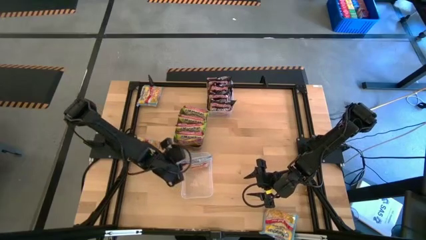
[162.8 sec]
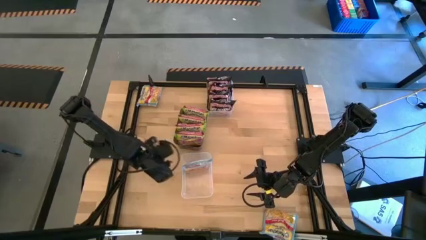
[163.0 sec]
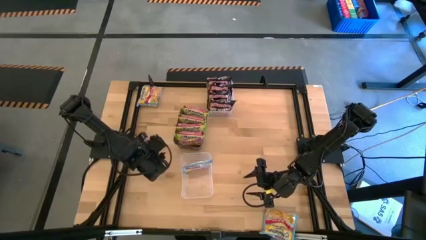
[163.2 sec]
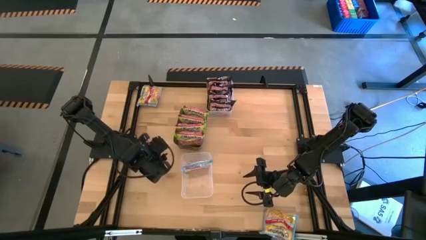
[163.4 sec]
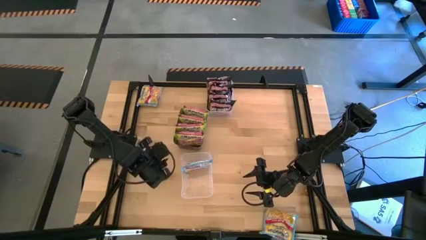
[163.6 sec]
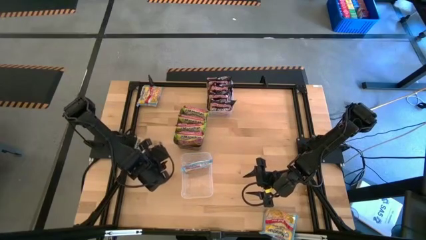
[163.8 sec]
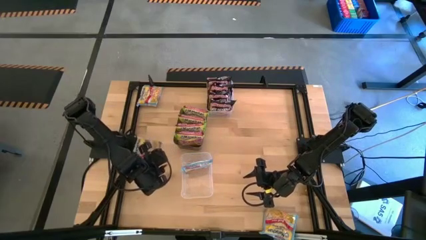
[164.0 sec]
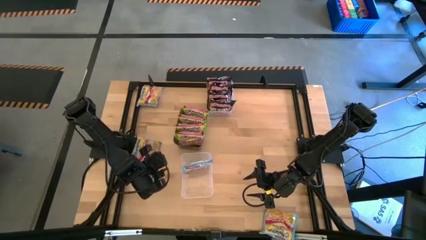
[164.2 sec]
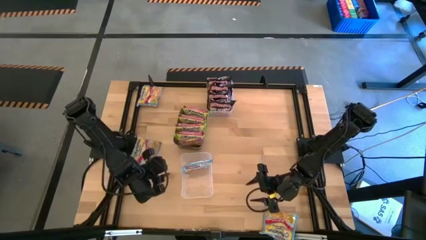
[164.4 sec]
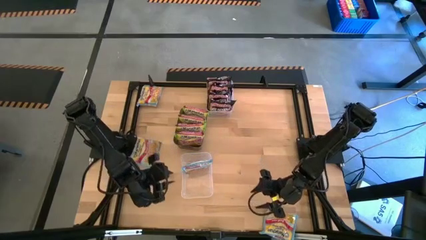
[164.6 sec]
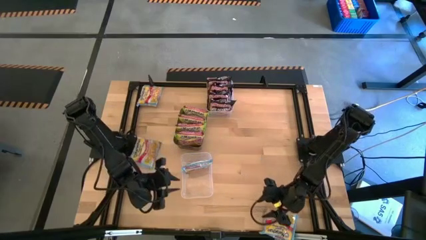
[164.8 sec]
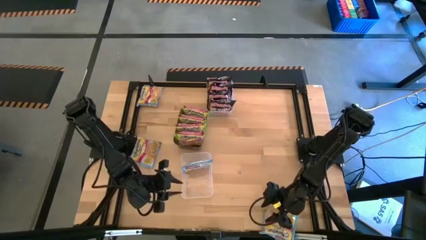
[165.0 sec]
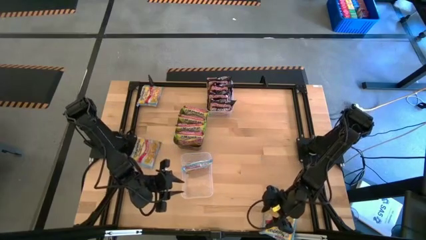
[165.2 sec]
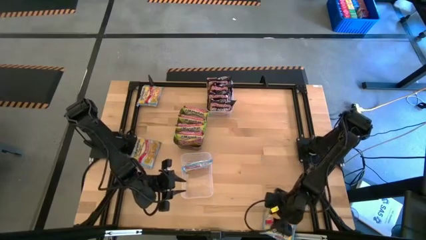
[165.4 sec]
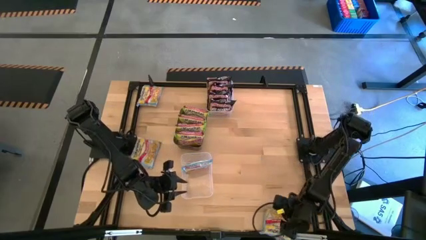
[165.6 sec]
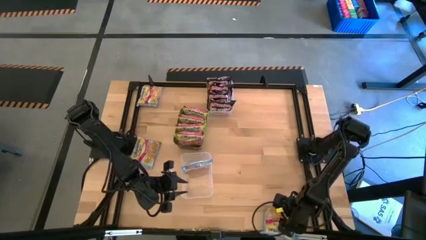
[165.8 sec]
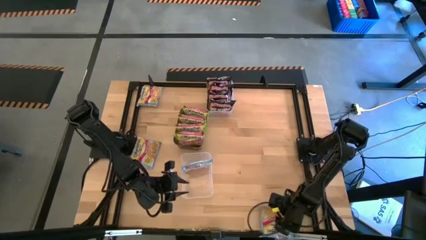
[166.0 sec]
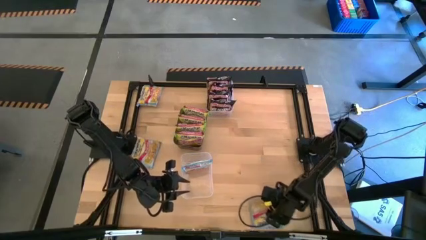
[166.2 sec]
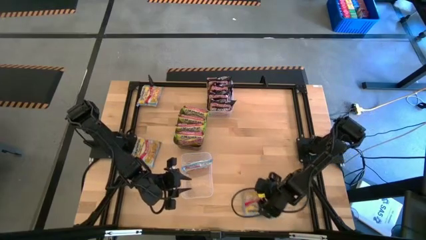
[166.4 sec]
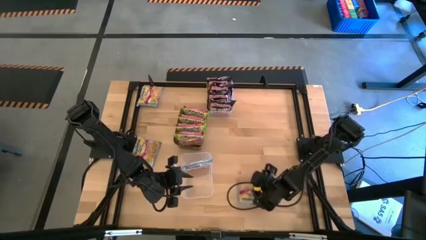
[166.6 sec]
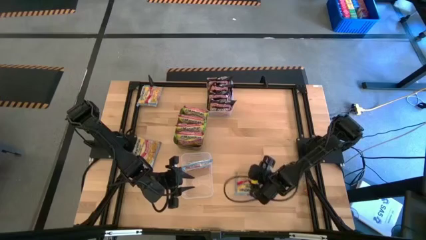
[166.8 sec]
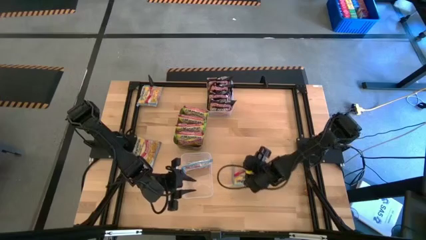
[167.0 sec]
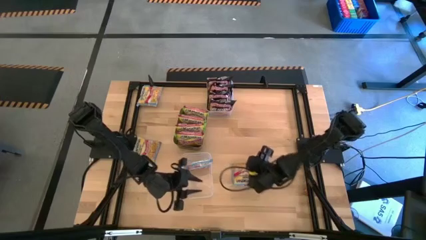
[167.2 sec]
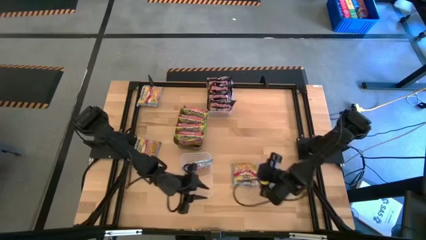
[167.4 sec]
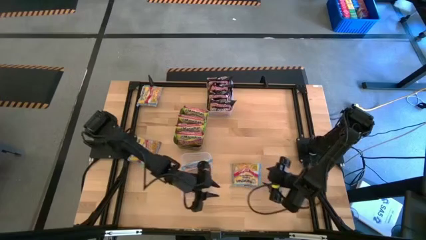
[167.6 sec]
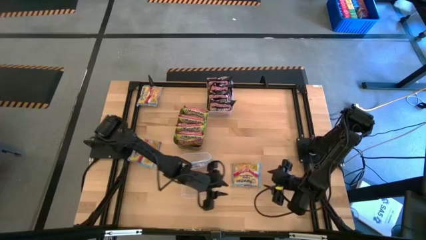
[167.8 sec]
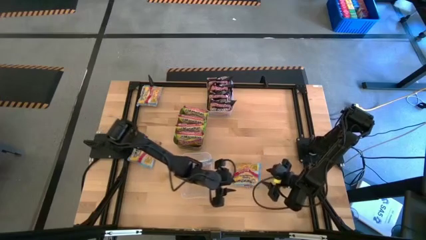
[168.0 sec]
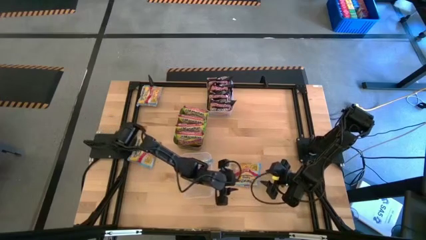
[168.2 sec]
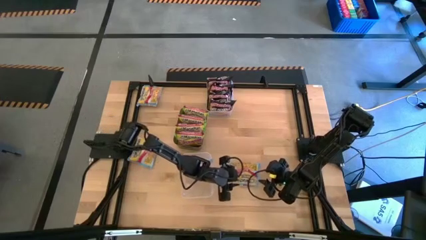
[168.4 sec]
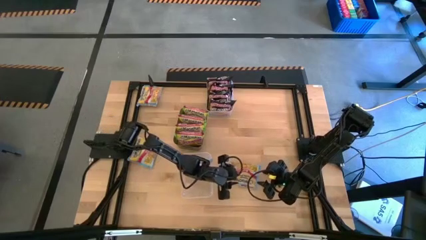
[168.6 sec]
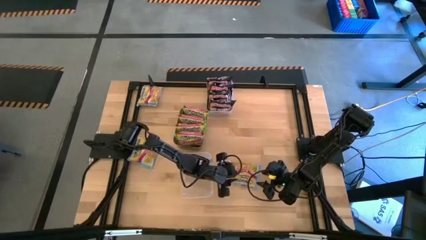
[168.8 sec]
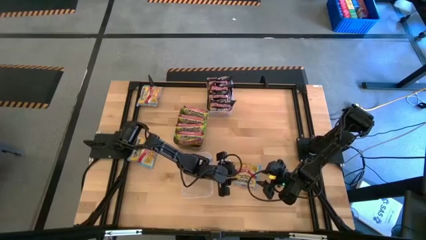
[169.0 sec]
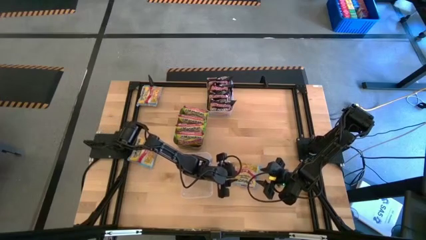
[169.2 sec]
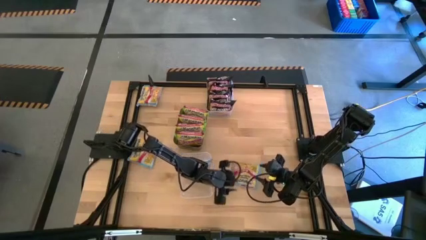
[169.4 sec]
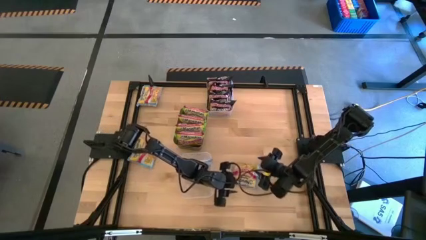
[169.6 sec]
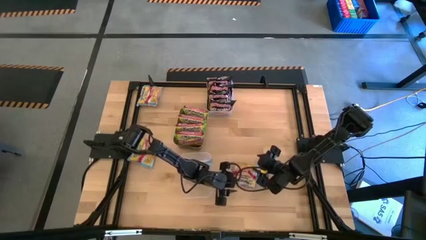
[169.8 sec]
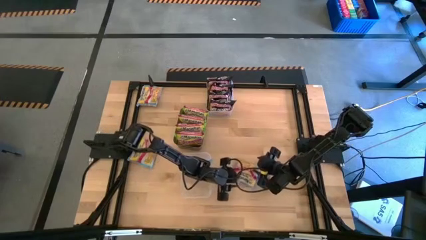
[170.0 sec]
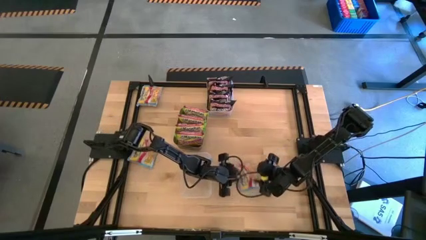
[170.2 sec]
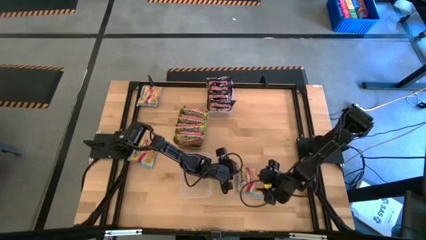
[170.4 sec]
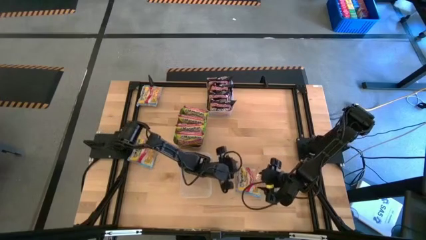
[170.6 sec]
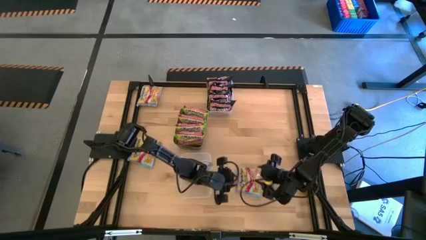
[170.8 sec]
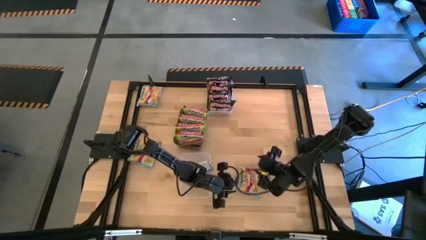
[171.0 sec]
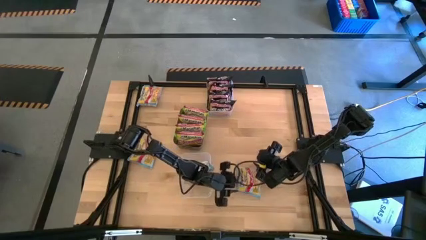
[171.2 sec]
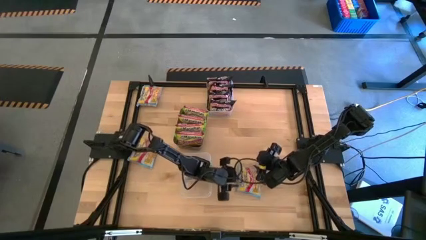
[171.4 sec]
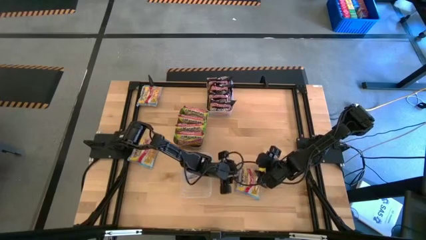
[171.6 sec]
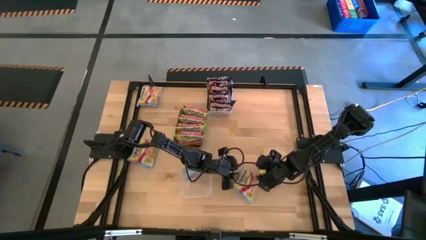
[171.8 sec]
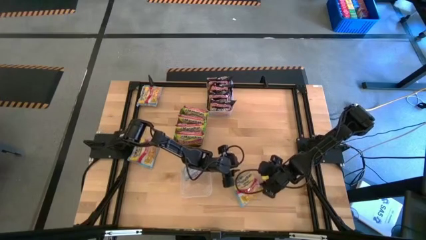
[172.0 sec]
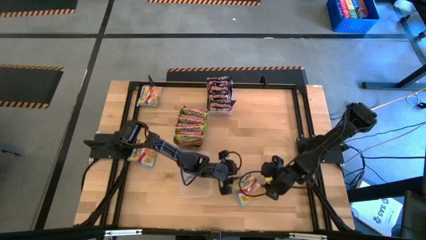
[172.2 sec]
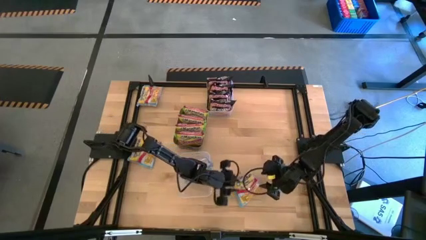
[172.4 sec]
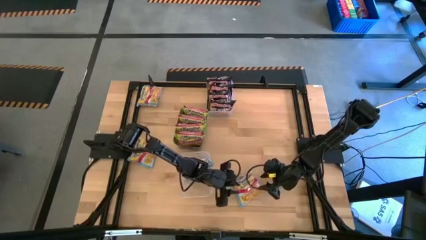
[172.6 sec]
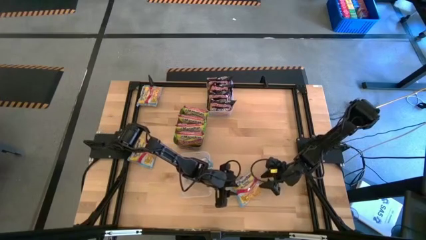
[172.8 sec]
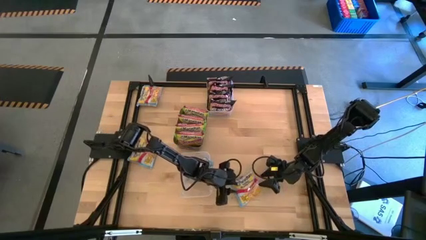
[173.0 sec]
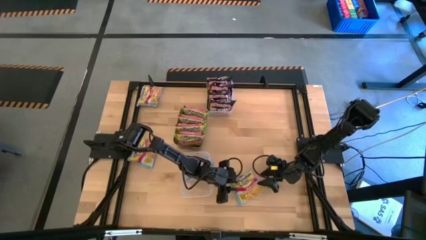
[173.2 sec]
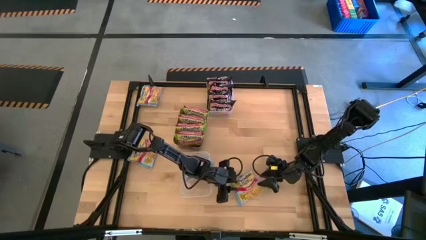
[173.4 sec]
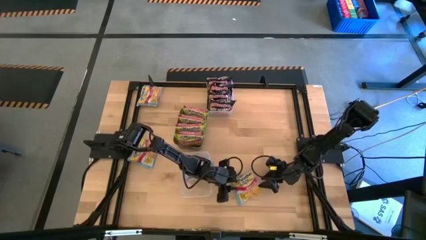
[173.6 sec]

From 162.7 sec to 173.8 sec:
Task: Sort Maruchan noodles
Put the right blue noodle pack into the bottom transparent bin

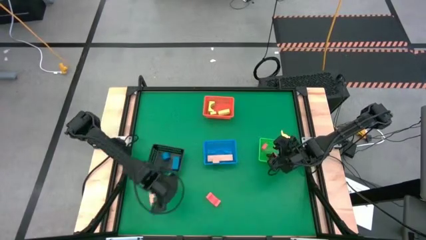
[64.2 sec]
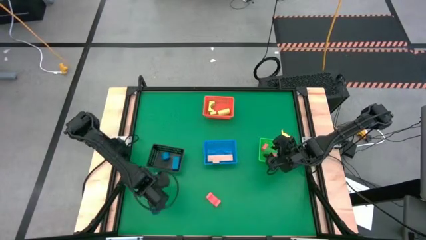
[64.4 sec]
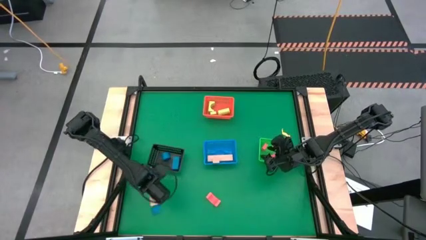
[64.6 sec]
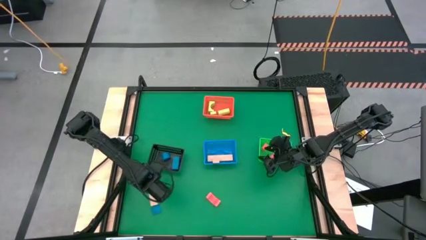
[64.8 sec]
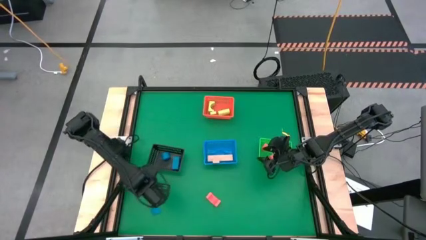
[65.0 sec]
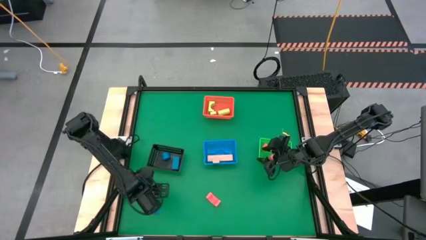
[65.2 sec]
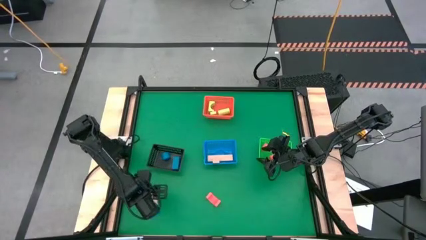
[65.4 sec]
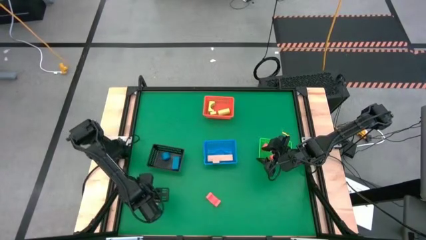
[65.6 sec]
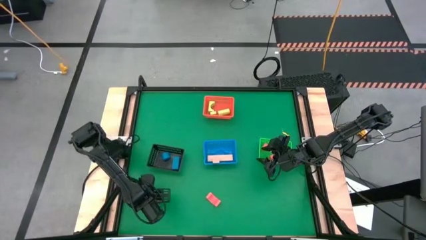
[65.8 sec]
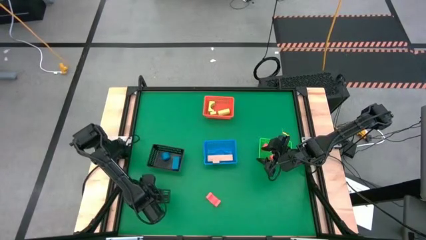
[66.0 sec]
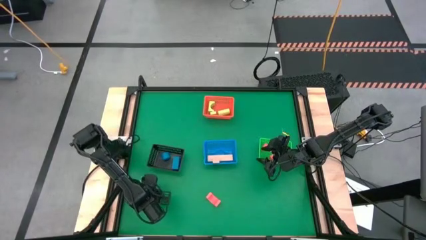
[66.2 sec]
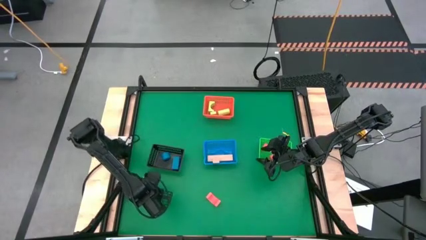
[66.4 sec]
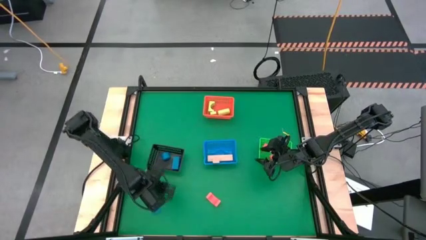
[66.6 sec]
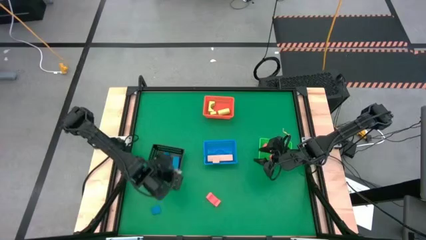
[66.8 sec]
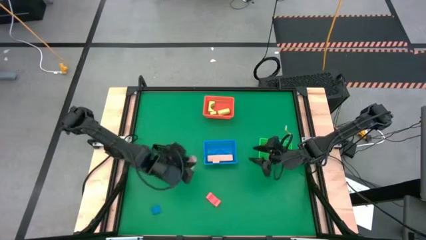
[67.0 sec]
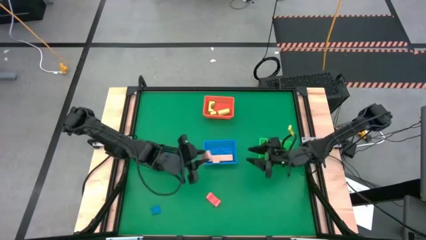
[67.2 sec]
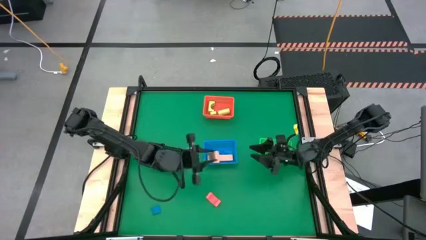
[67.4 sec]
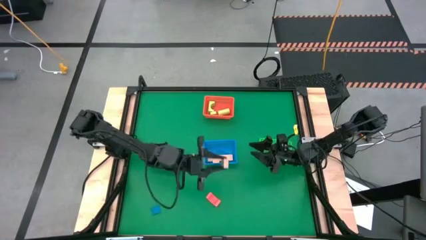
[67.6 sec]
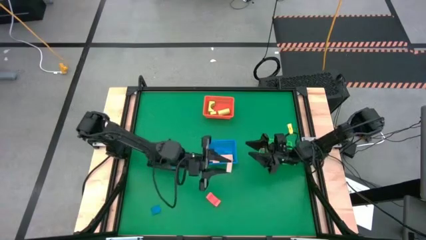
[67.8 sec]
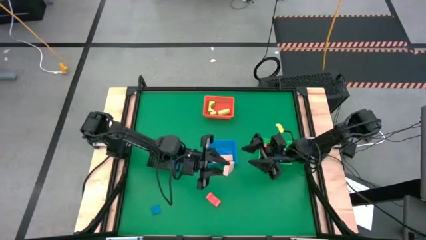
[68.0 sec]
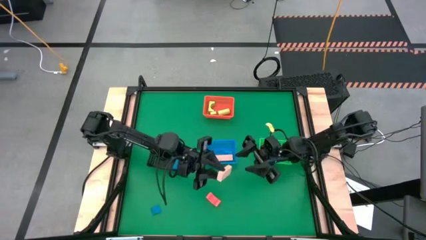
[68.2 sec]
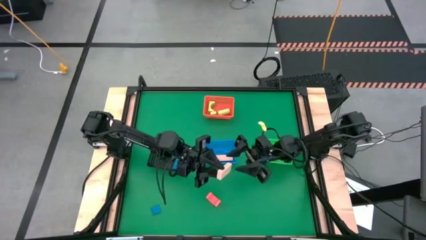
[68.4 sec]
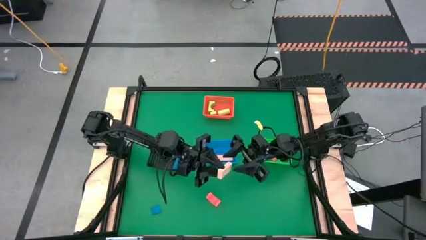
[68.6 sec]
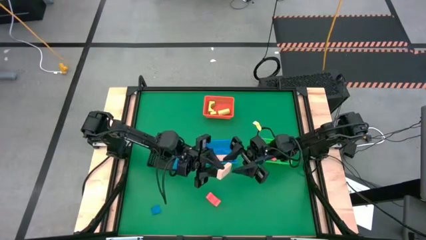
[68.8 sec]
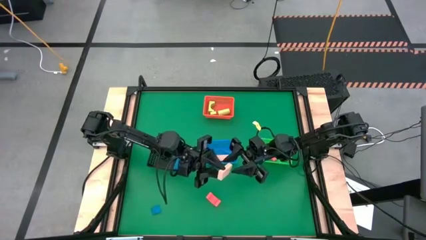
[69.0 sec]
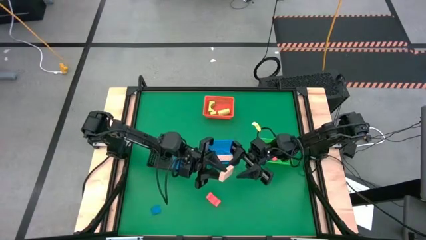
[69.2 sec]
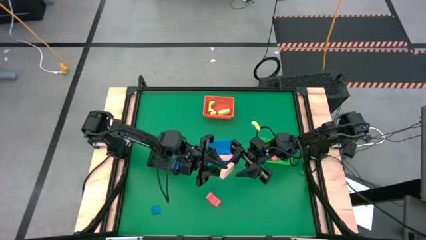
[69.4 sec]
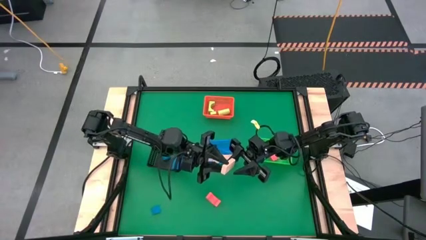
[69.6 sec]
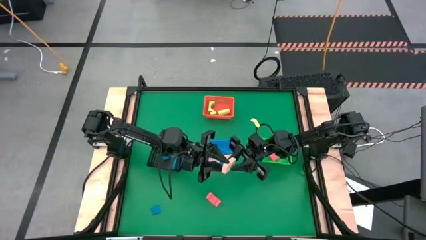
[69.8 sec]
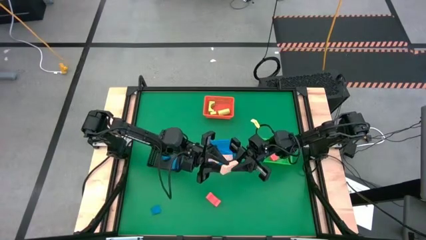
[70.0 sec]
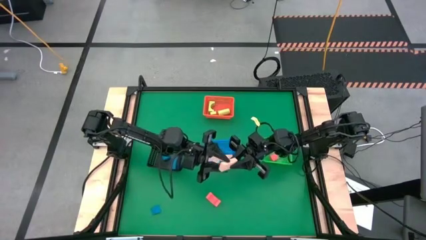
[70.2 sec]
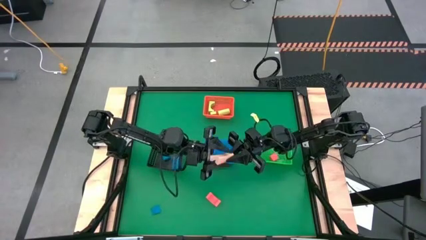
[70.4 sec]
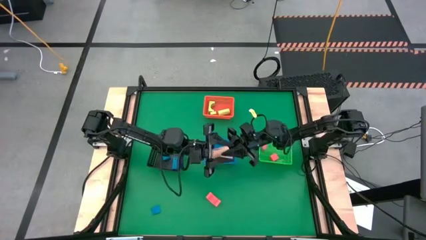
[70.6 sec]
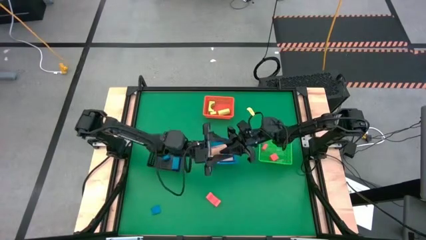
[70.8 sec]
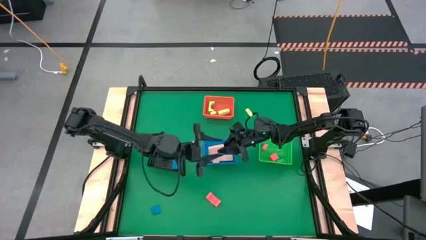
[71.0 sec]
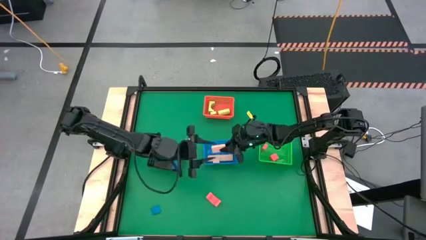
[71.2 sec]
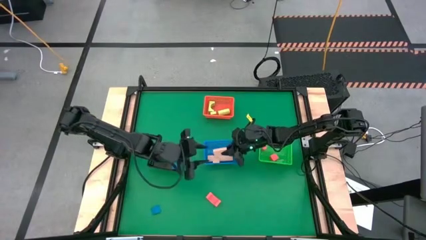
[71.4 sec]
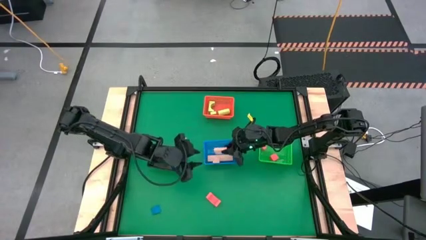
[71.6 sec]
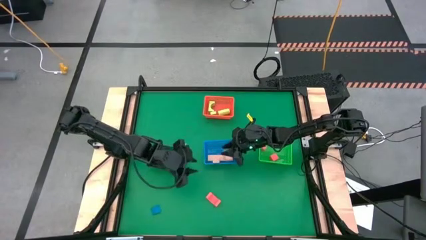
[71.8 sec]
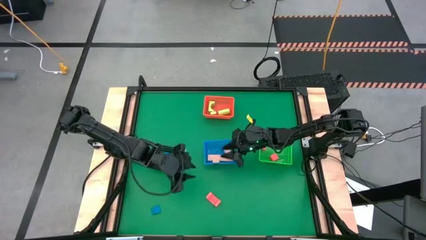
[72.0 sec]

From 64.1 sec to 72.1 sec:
Task: Sort & place blocks by color
Put the brown block into the blue bin
